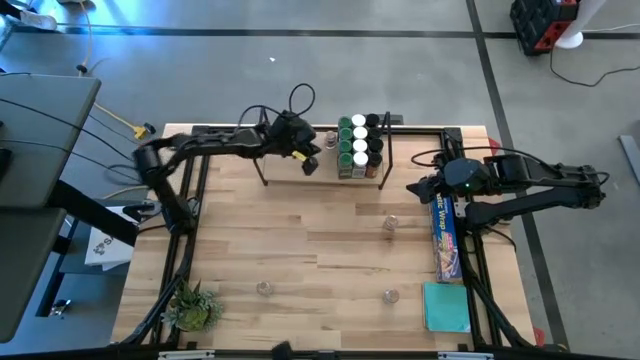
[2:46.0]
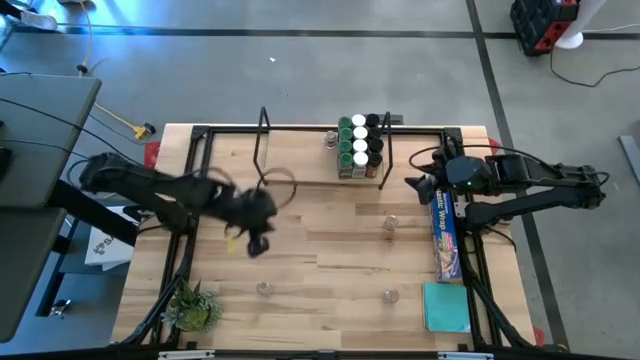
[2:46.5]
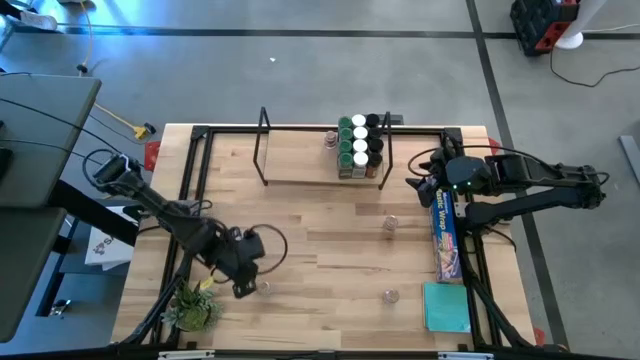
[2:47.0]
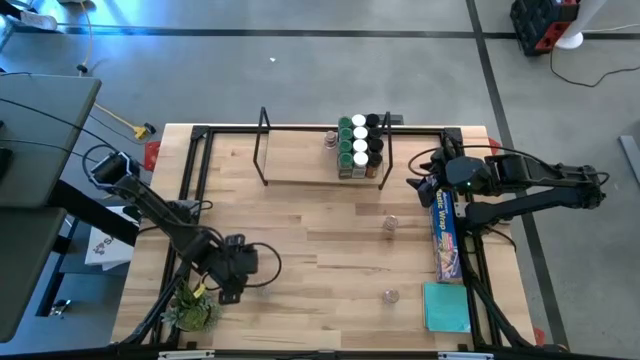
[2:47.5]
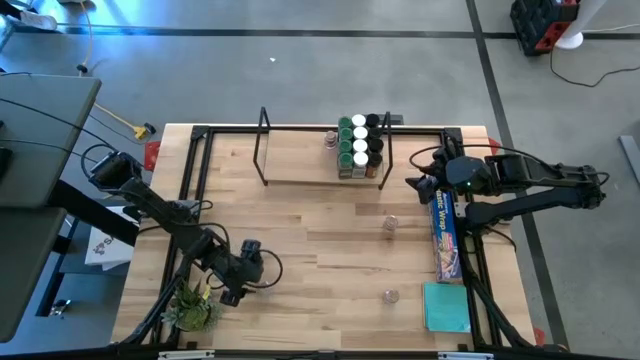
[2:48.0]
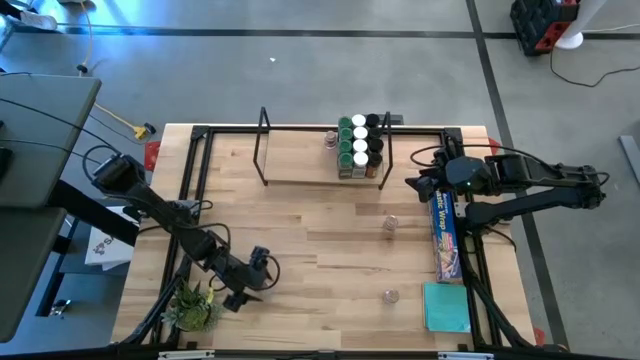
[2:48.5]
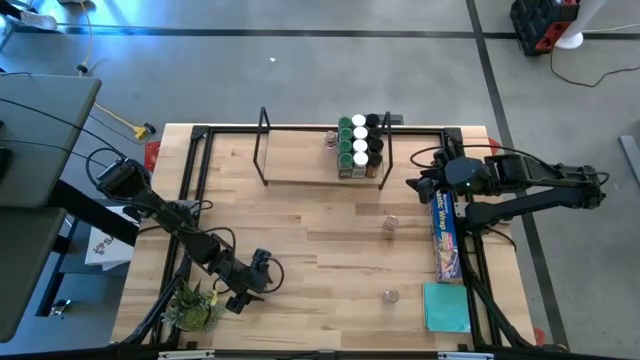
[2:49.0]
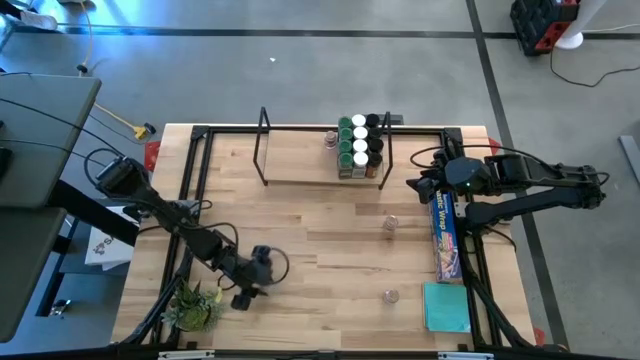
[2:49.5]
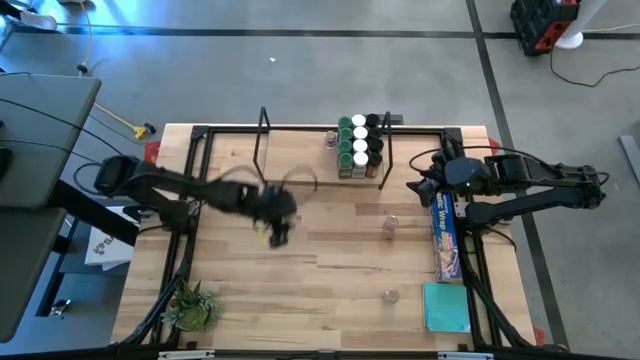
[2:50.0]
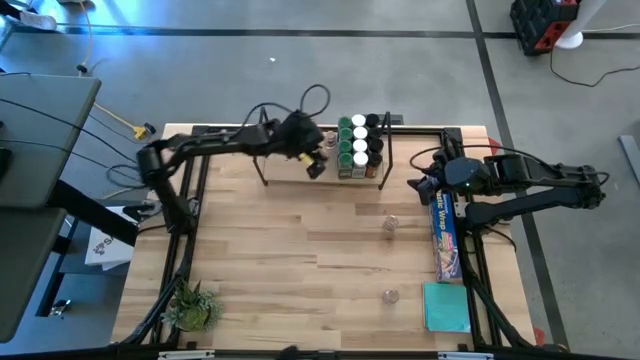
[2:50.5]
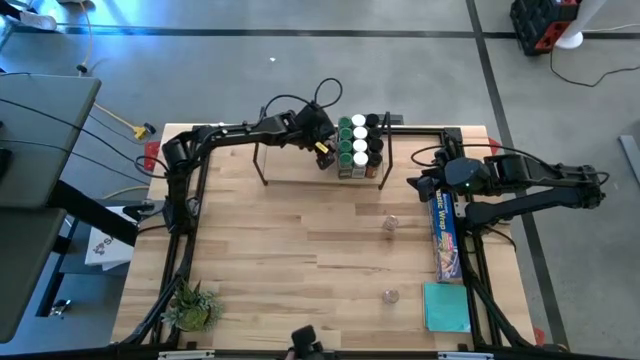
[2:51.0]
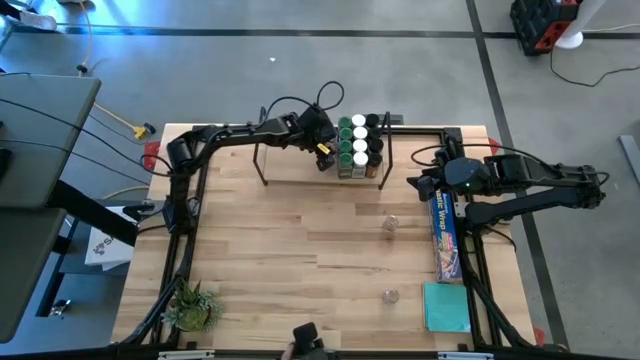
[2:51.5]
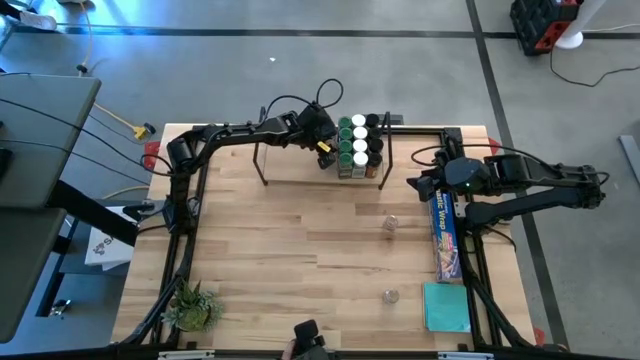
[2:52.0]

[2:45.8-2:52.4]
Task: Shelf spices
Put the brown seasoning bottle on the shelf aligned with the other brown seasoning bottle

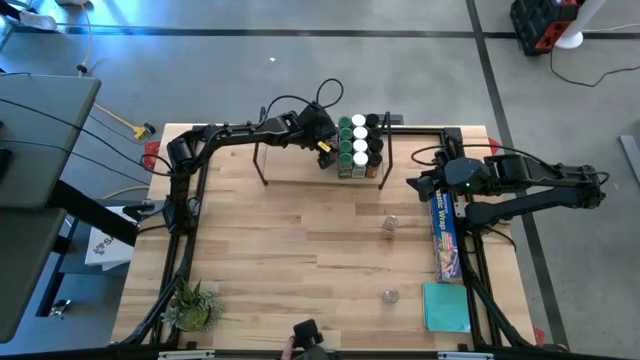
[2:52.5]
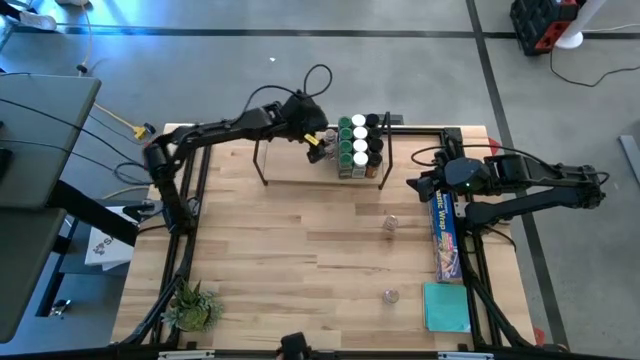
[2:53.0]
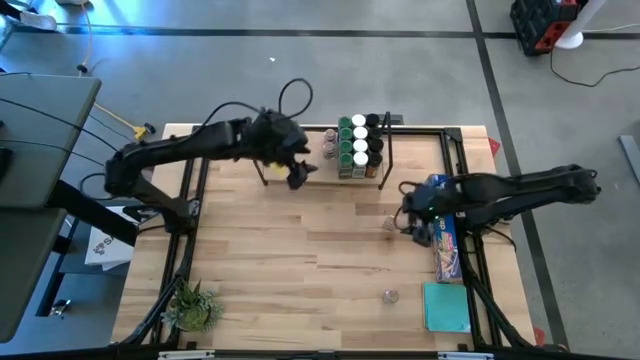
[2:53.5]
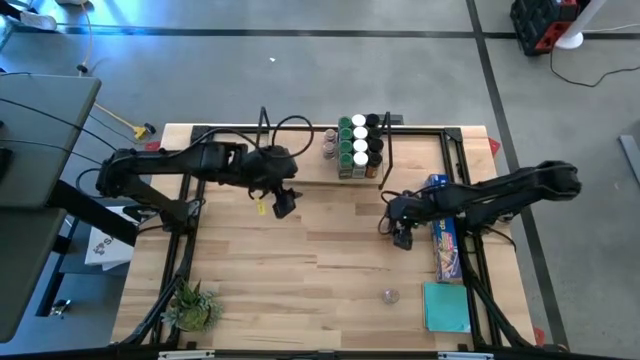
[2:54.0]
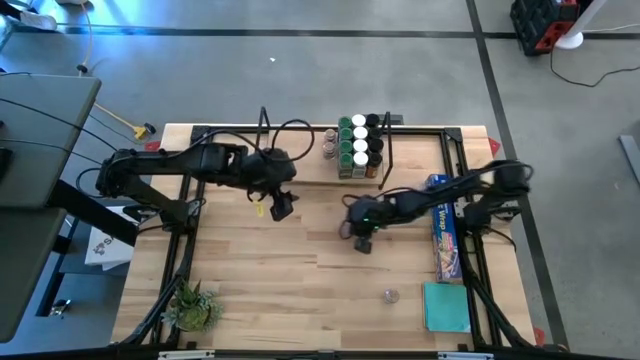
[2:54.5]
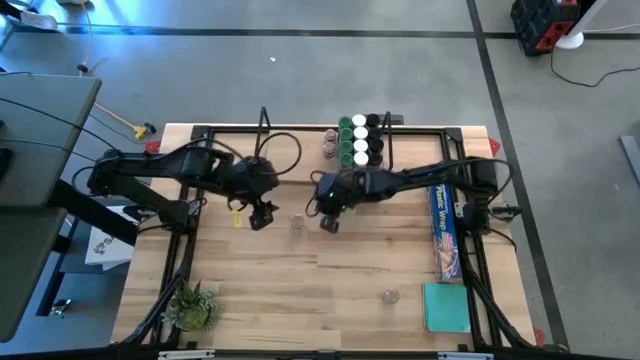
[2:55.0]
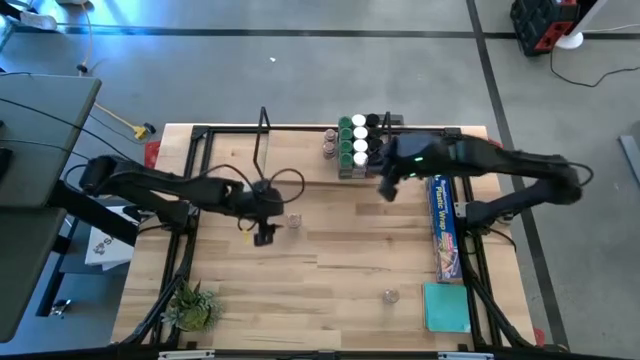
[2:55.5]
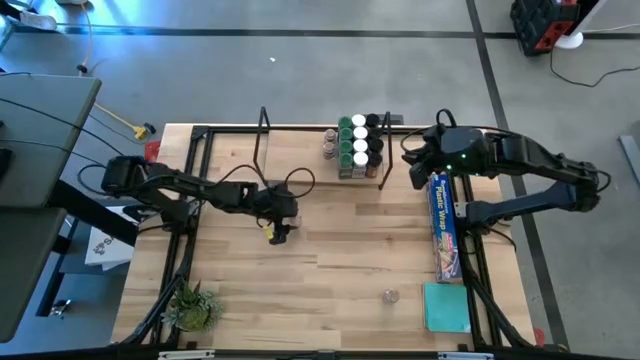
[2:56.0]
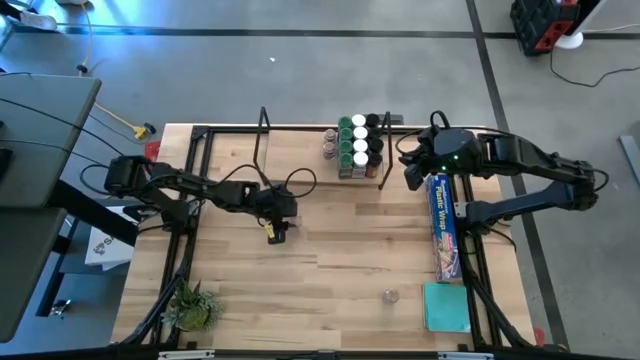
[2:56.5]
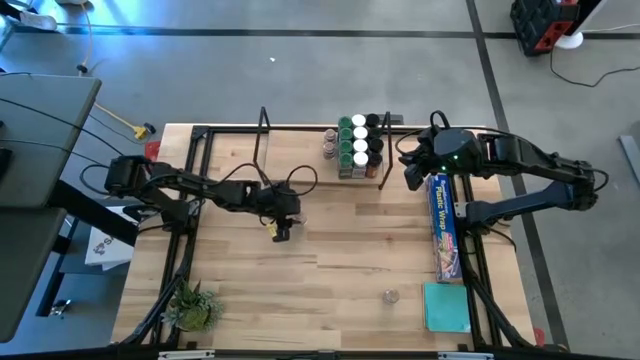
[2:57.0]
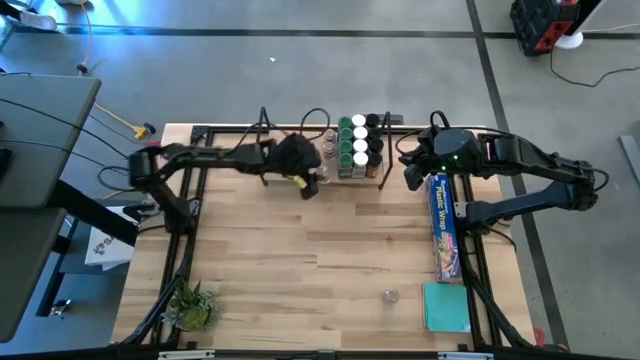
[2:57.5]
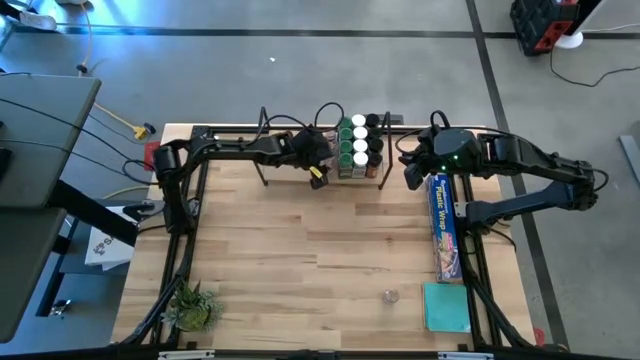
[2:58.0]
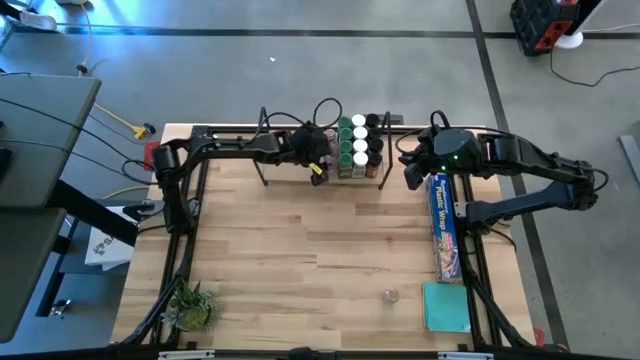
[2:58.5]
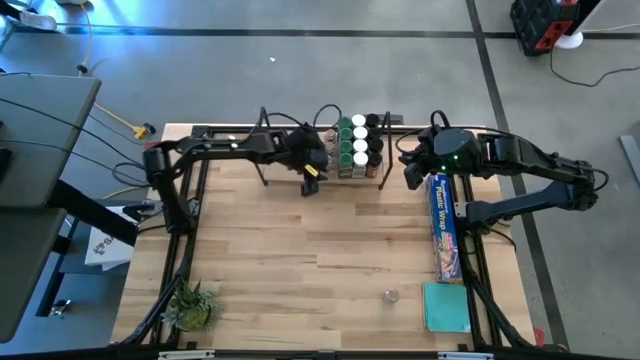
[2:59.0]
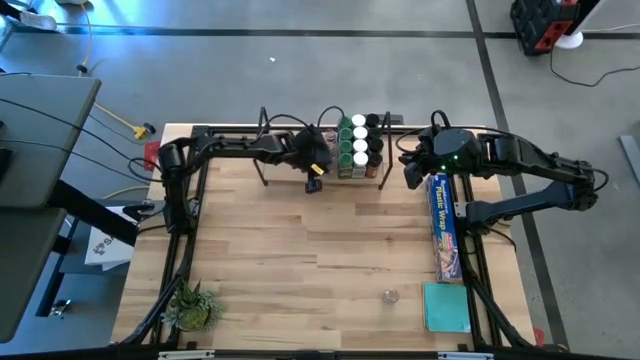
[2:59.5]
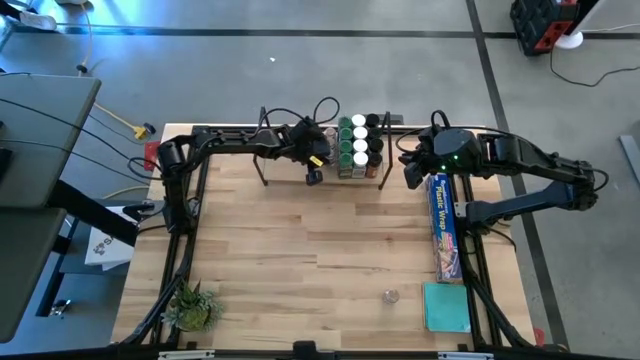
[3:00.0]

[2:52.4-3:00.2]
Put the brown seasoning bottle on the shelf aligned with the other brown seasoning bottles

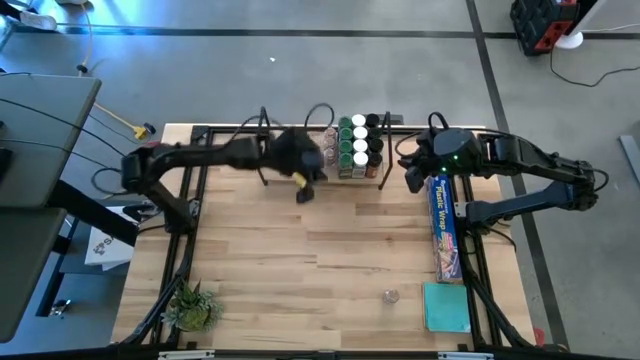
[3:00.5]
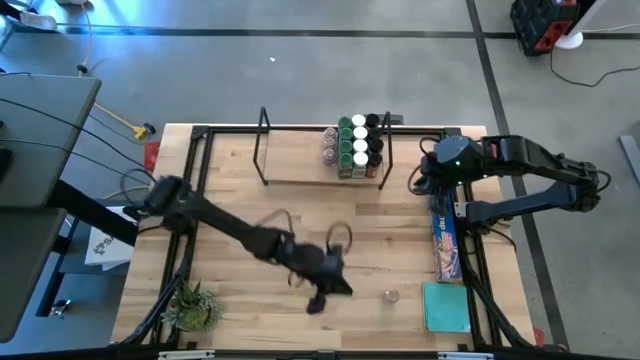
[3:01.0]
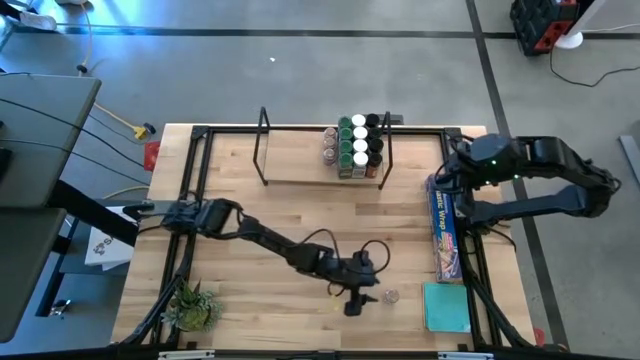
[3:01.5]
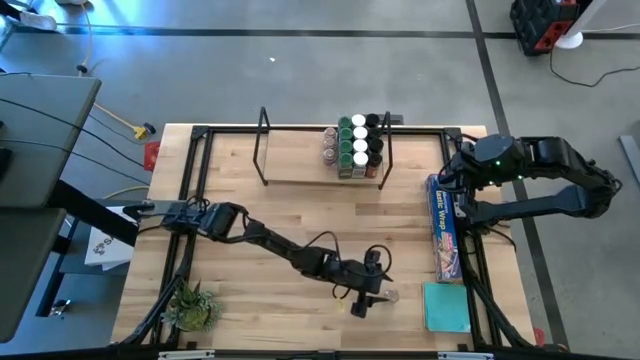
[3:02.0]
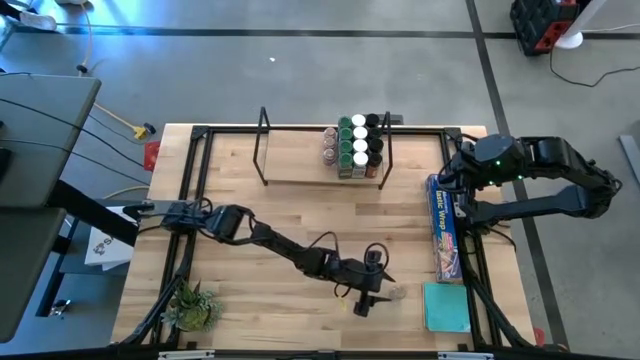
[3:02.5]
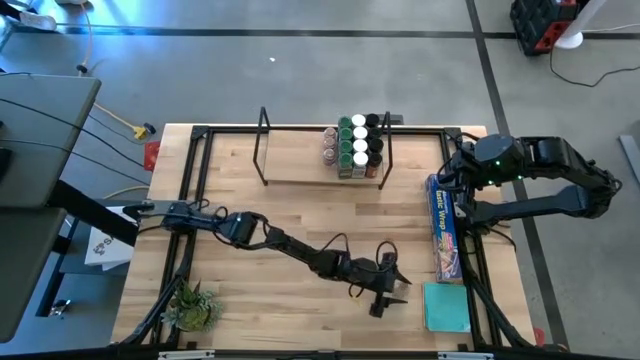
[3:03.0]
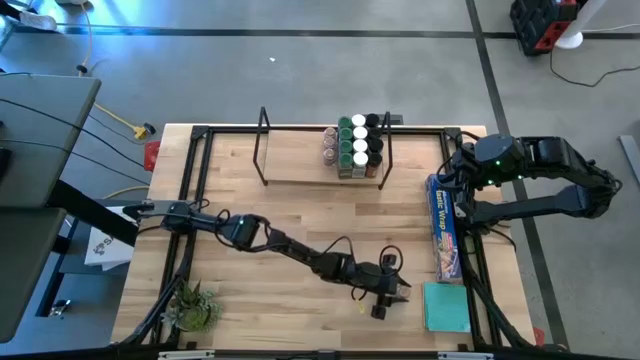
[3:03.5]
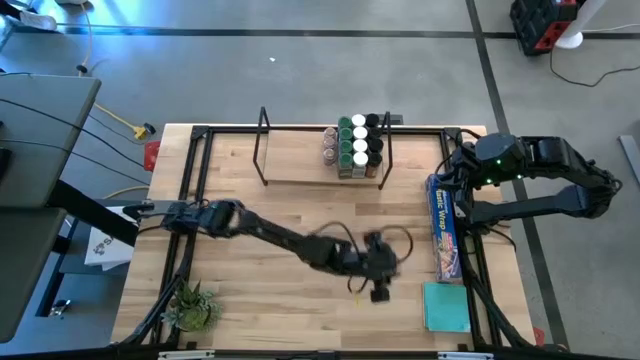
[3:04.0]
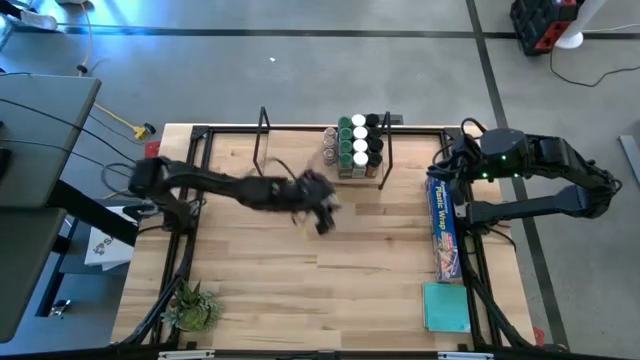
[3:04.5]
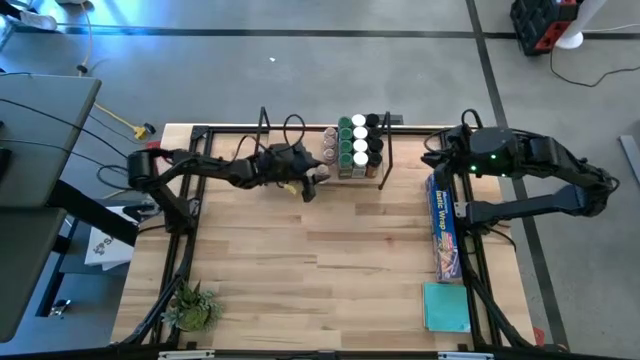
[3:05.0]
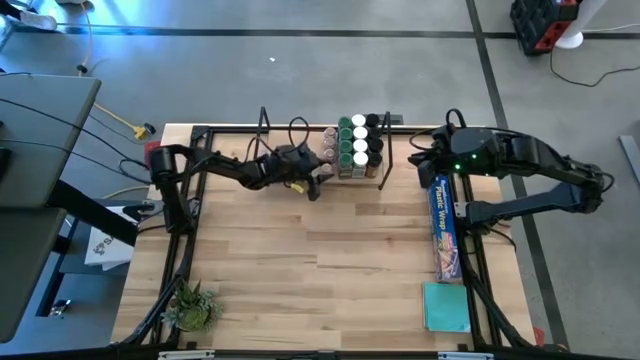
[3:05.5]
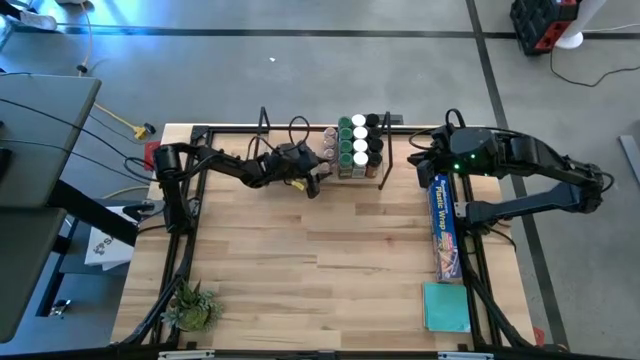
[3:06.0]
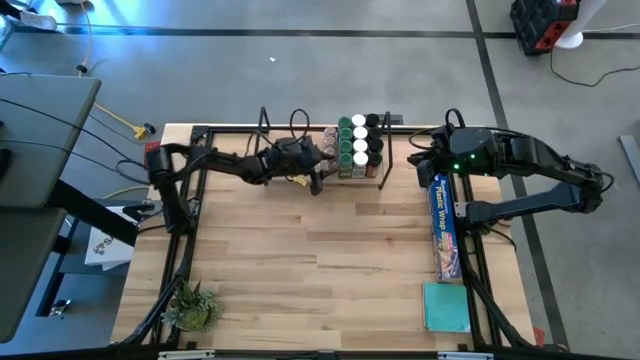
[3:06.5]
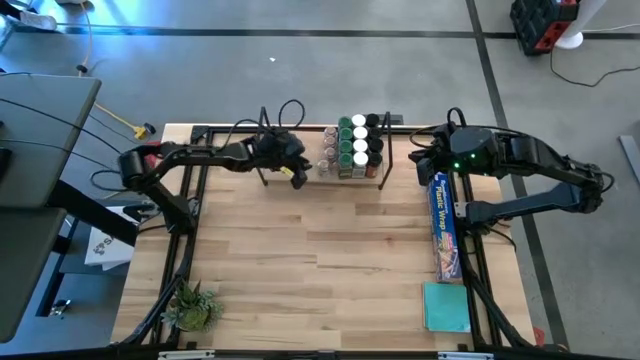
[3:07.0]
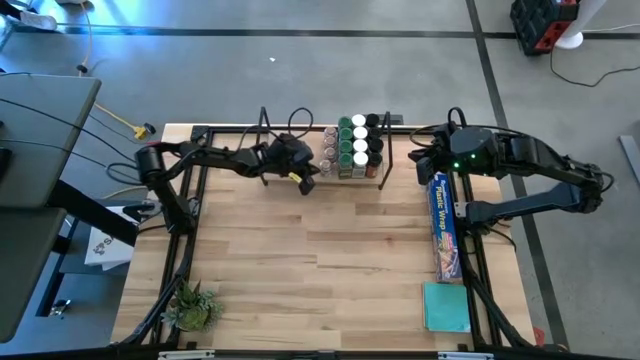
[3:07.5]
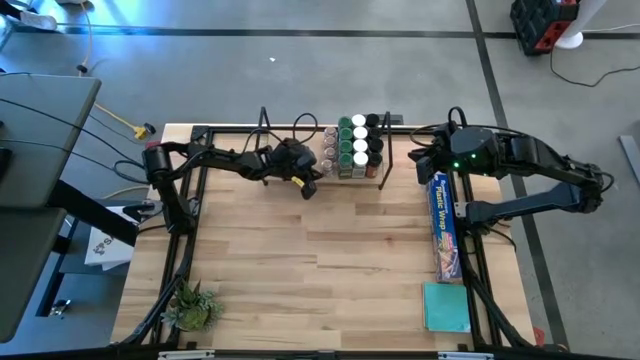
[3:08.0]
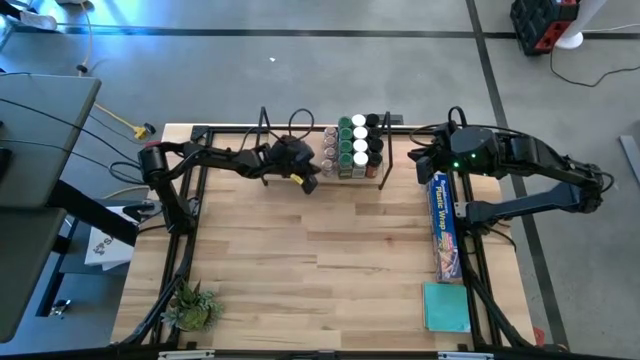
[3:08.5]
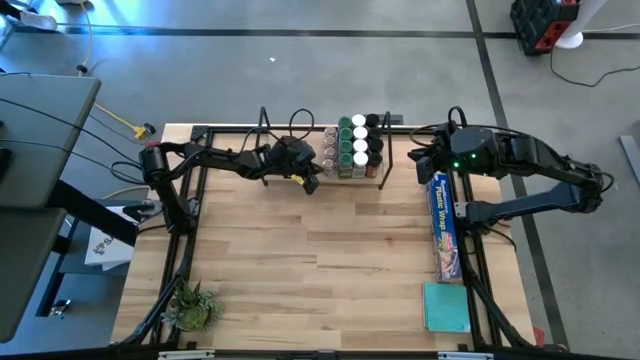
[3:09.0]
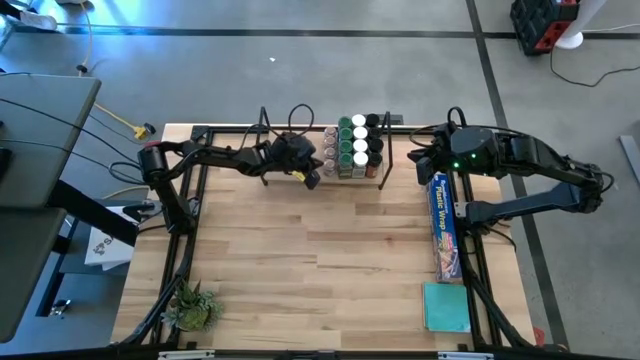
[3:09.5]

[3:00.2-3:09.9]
Put the brown seasoning bottle on the shelf aligned with the other brown seasoning bottles
